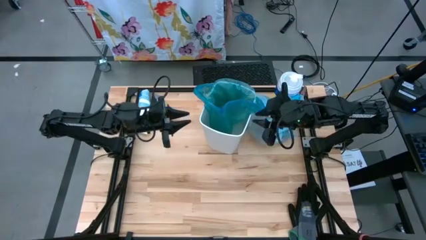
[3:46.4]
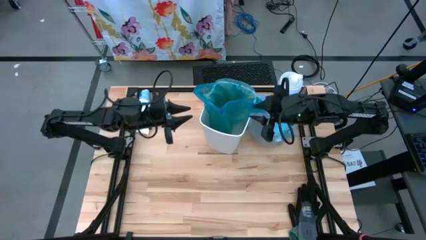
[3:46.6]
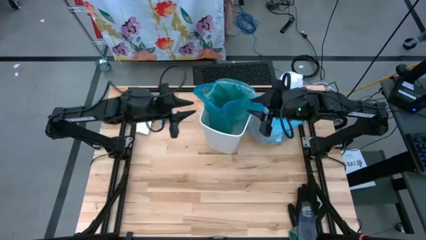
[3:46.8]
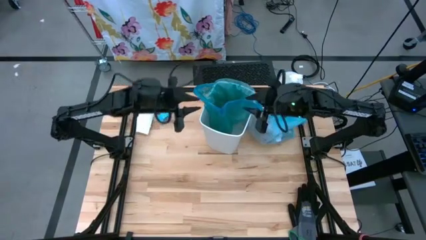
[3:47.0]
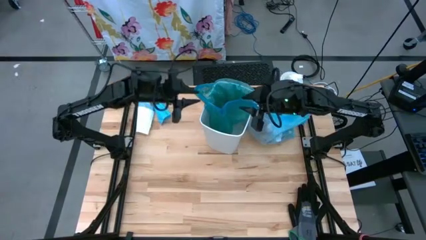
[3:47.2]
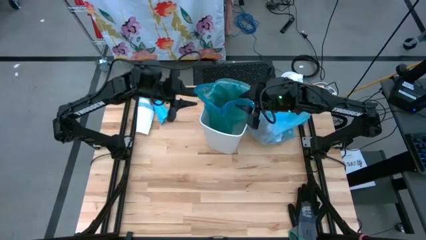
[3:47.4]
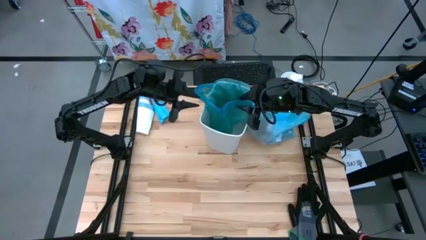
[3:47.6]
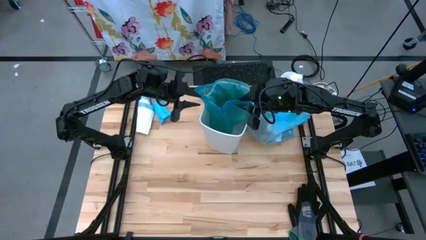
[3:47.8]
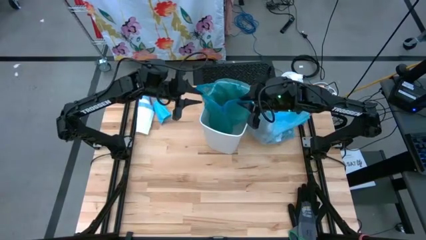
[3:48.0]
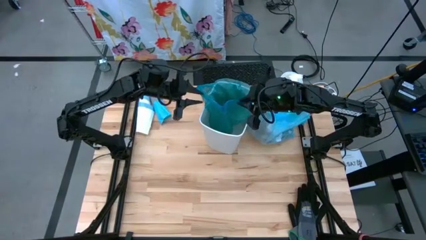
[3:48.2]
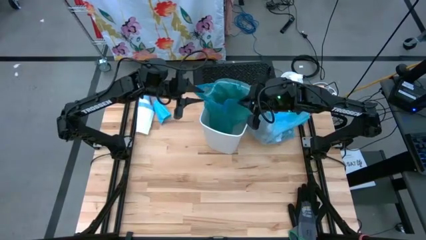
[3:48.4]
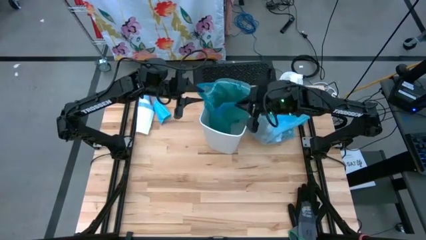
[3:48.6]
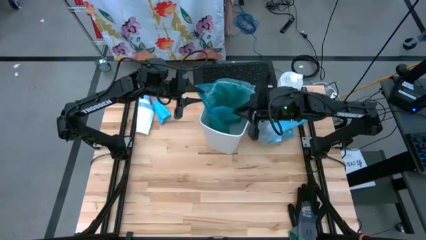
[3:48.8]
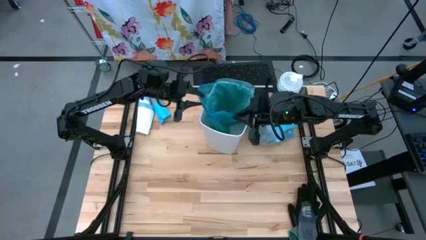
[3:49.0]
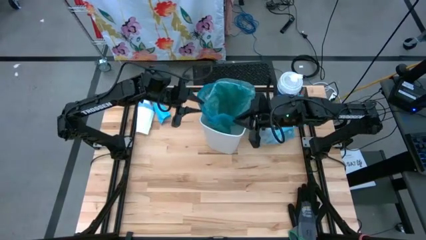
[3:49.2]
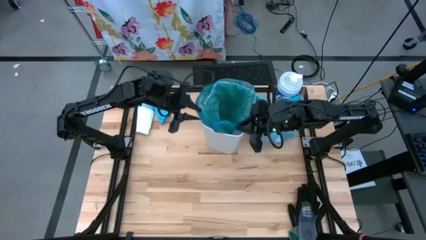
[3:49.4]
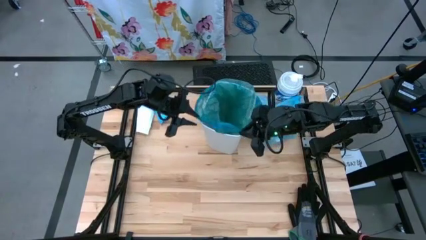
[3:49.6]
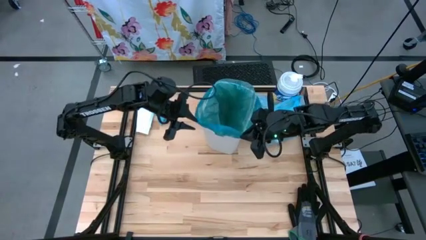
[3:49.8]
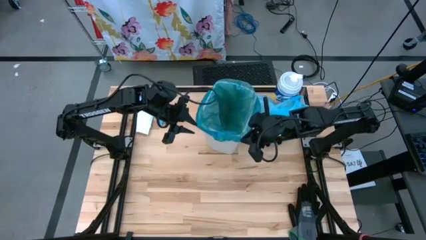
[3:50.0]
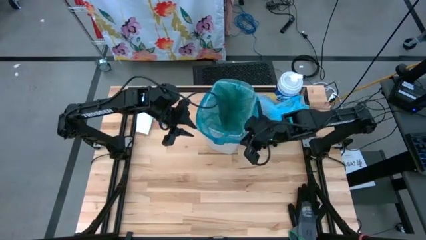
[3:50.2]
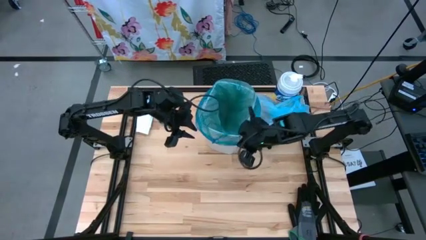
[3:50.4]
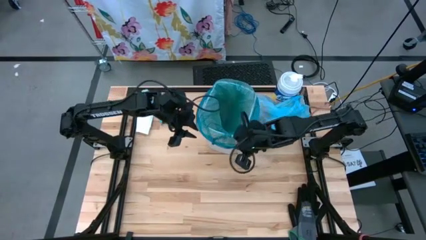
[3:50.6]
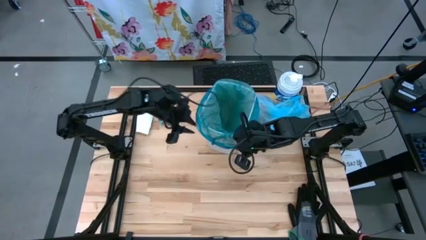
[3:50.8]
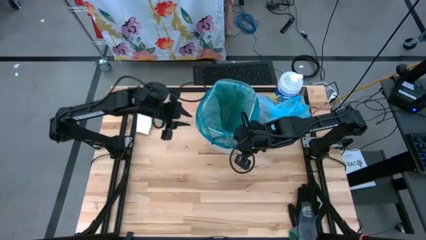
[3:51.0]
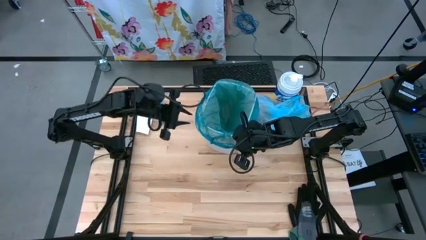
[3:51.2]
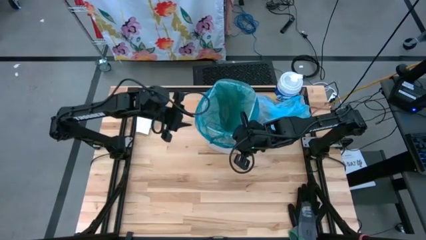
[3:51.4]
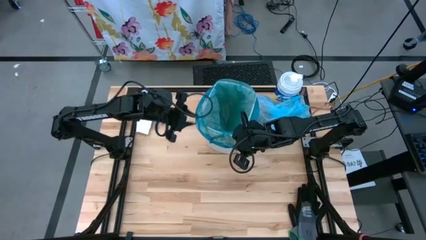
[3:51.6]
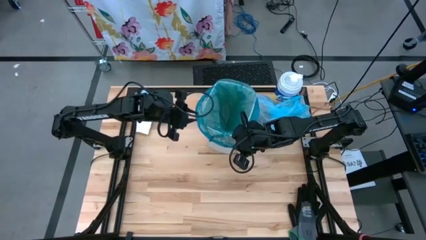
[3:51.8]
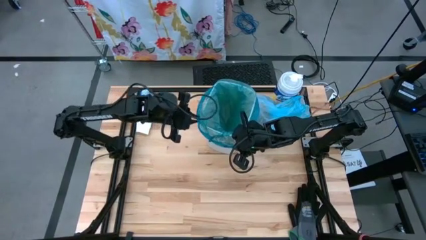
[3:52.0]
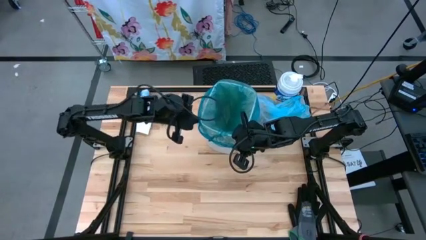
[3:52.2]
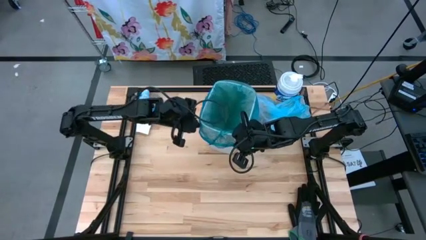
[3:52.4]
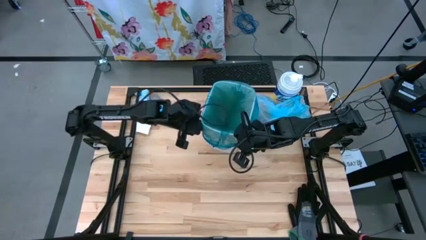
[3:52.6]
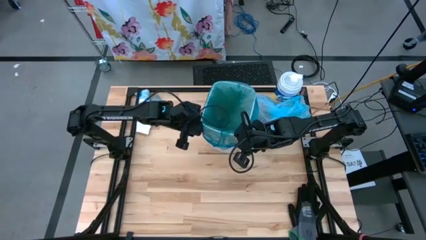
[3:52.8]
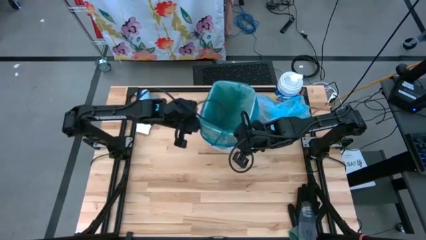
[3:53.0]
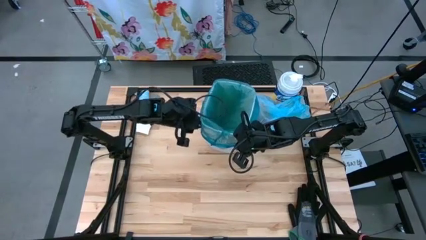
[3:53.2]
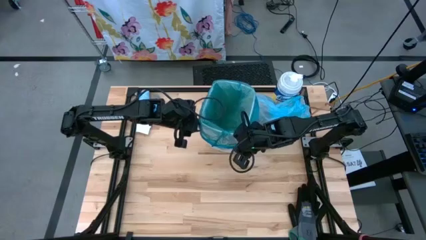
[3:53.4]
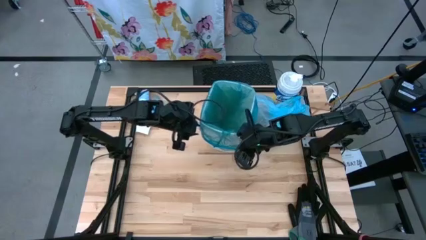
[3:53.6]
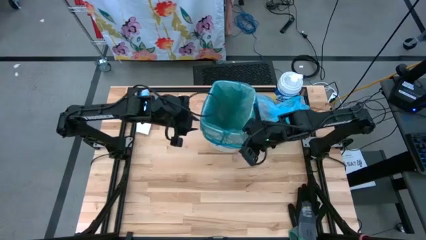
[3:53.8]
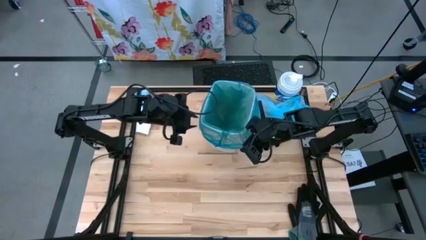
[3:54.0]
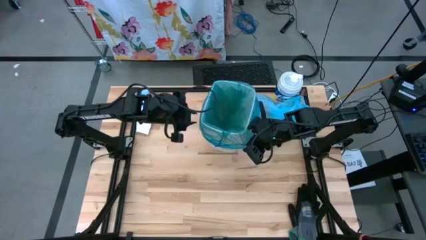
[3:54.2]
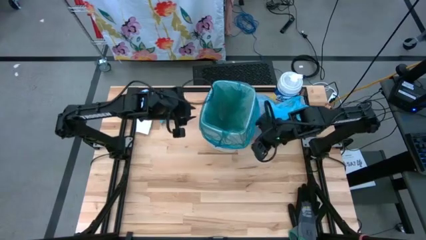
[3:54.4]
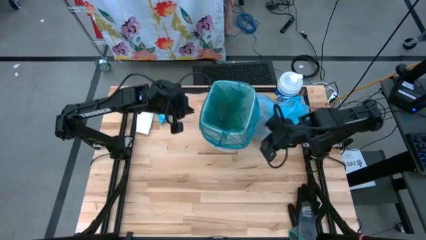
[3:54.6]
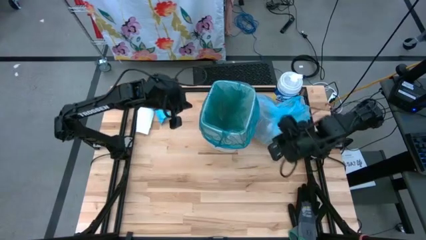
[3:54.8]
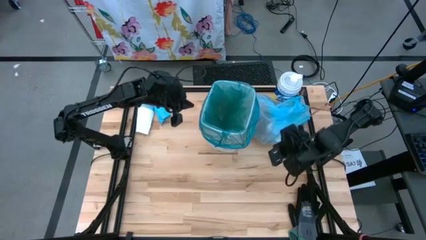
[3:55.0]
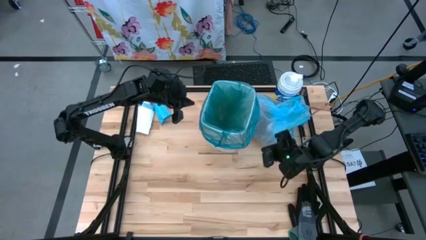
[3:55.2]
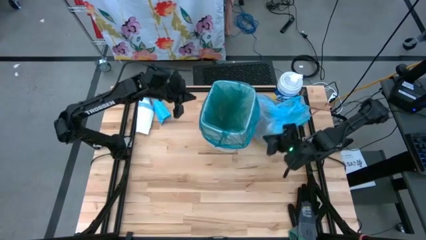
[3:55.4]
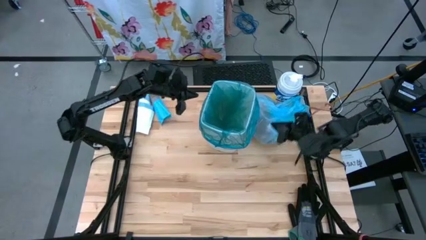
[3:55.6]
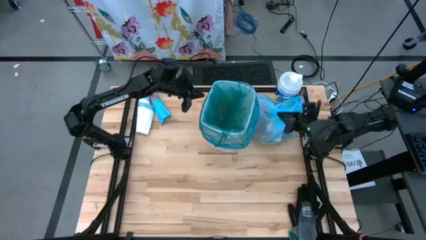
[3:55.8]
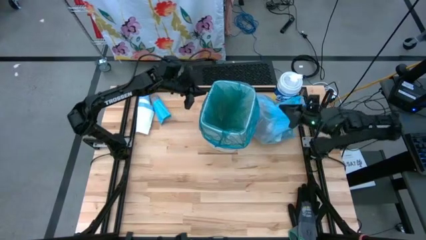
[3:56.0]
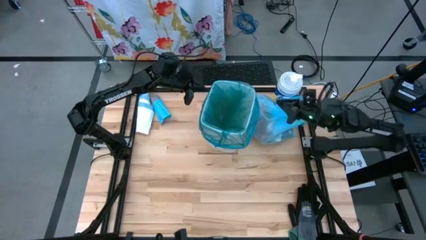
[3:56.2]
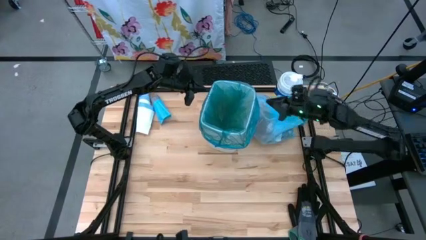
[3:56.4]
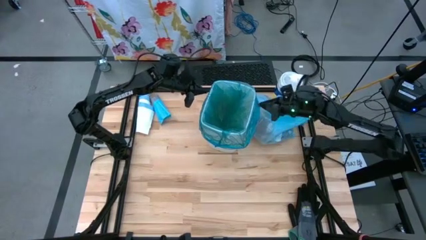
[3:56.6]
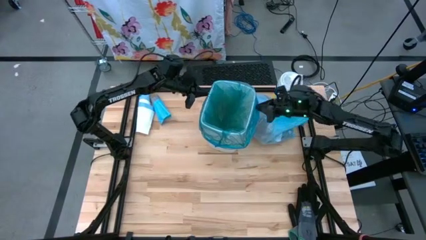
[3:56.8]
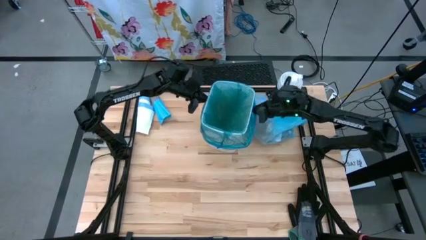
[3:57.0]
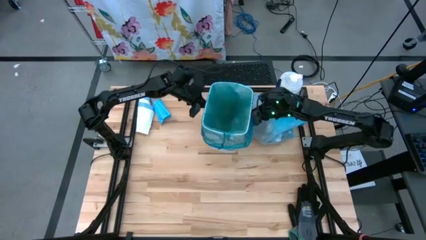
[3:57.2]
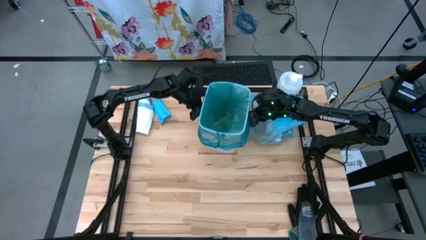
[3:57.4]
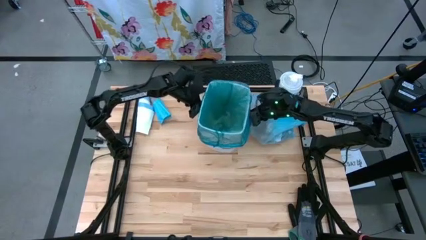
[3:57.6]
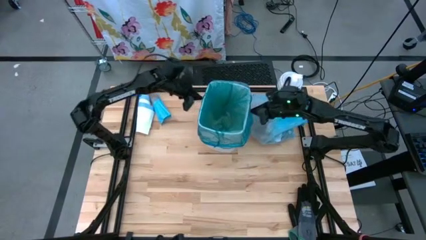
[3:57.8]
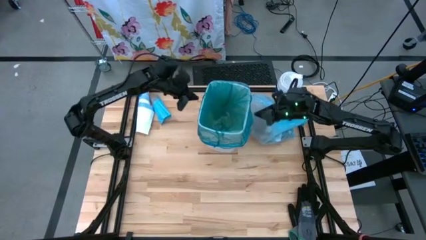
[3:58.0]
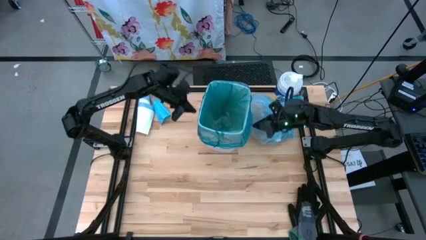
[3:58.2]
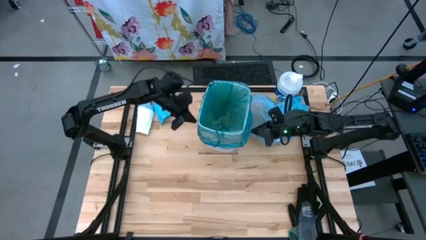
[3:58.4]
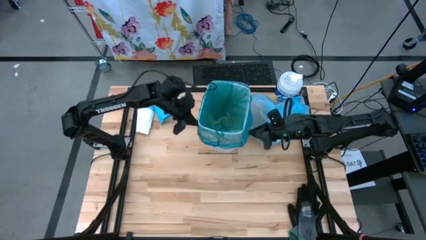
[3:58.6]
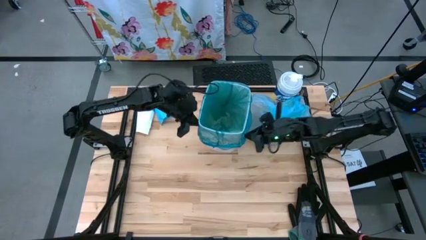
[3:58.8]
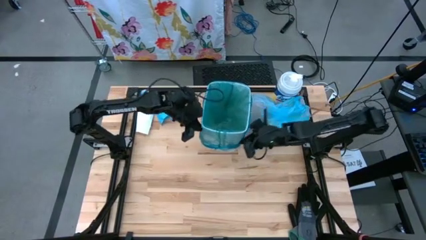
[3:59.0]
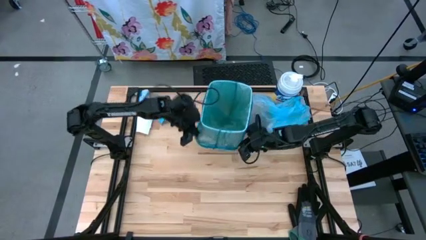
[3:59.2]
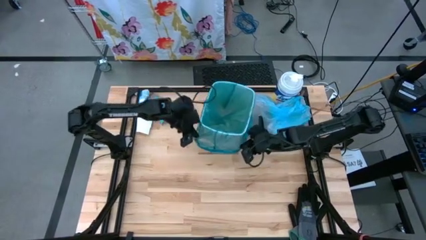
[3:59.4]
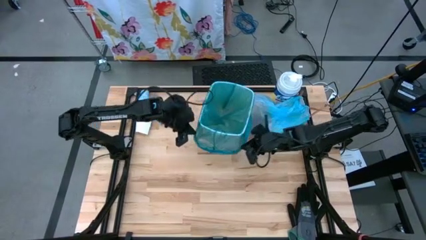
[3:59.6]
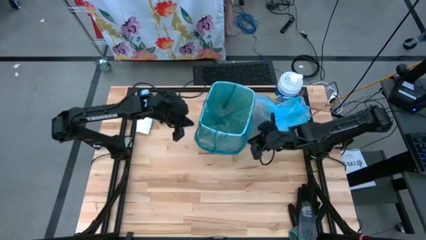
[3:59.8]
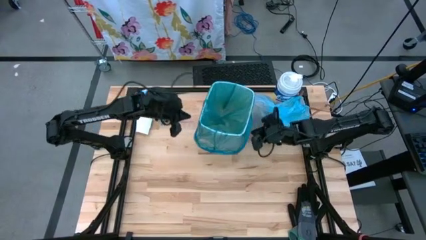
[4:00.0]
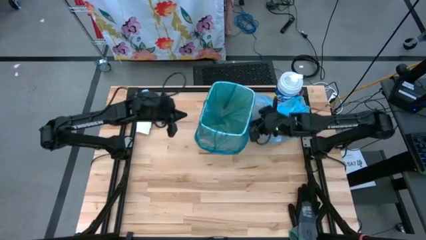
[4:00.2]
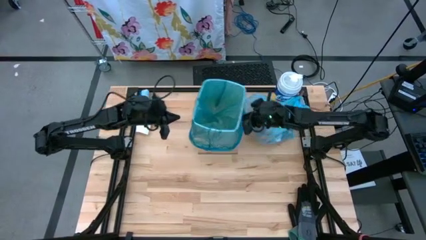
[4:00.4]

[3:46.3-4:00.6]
Task: place trash/remove bag and relplace
Put the blue trash bag into the trash bin
